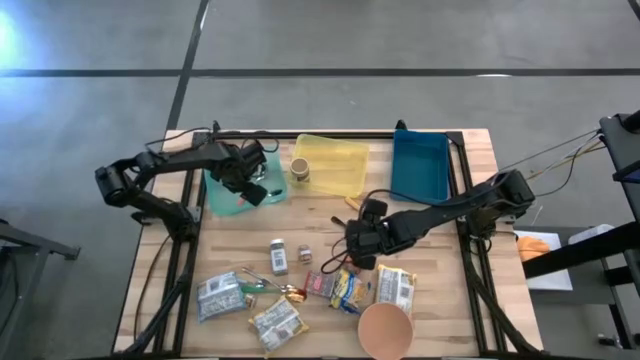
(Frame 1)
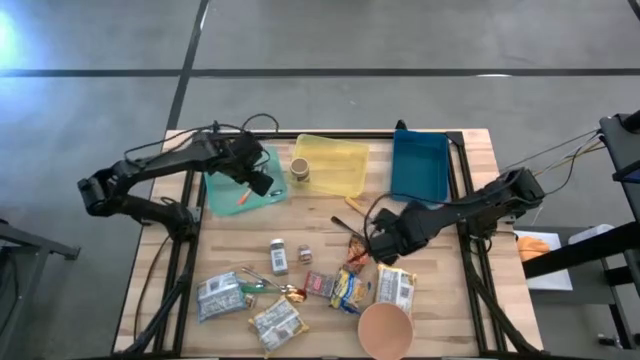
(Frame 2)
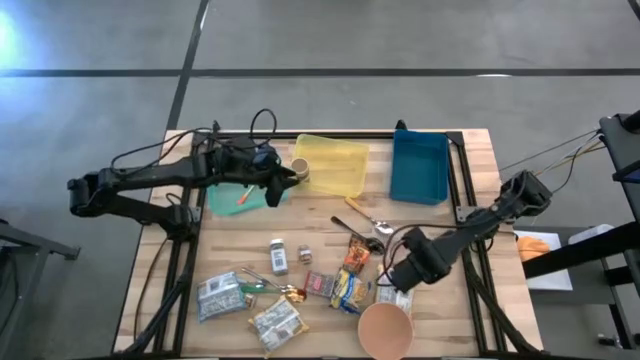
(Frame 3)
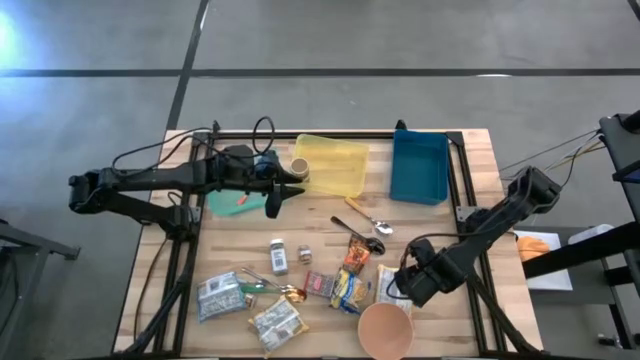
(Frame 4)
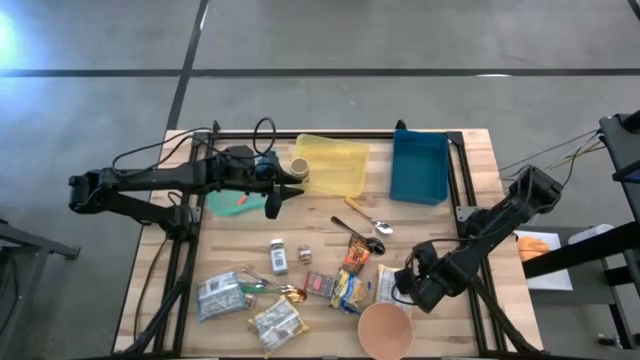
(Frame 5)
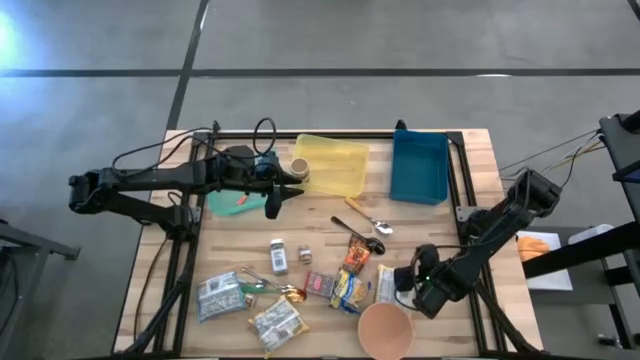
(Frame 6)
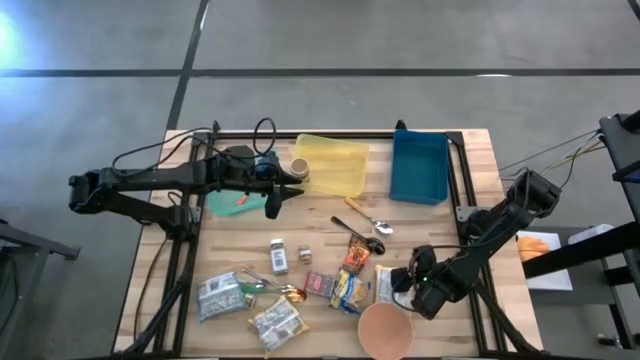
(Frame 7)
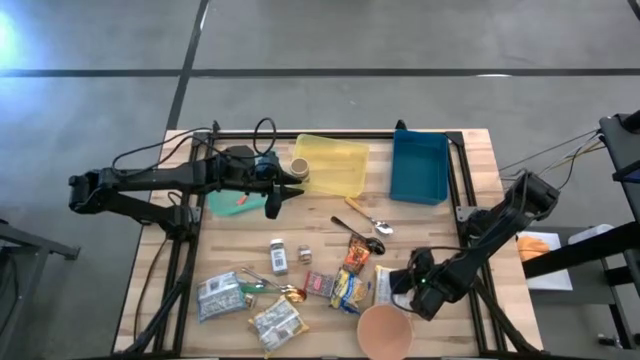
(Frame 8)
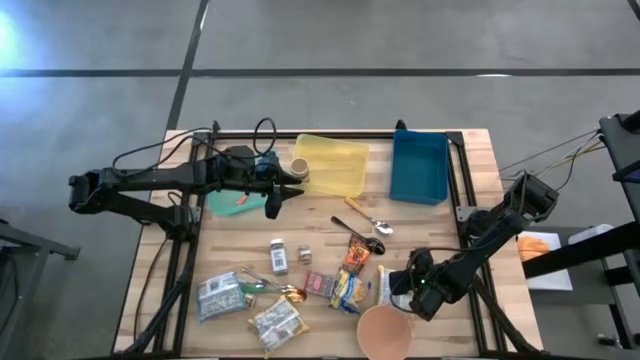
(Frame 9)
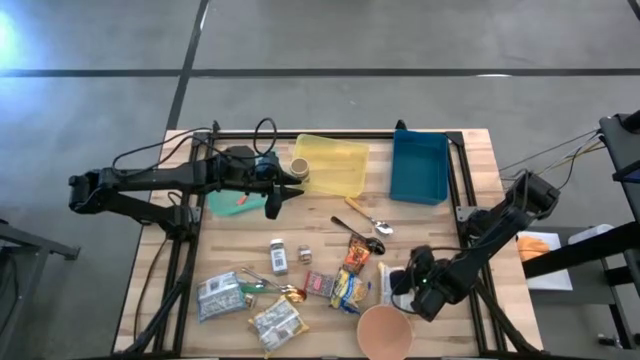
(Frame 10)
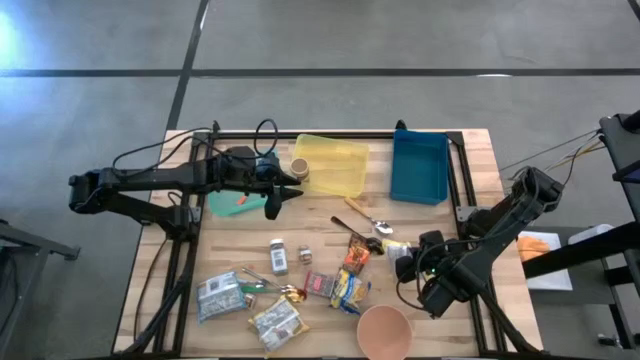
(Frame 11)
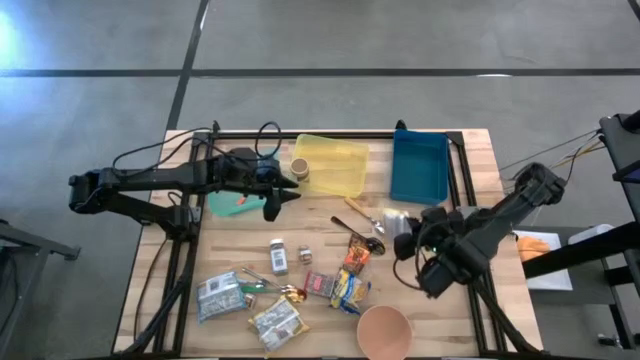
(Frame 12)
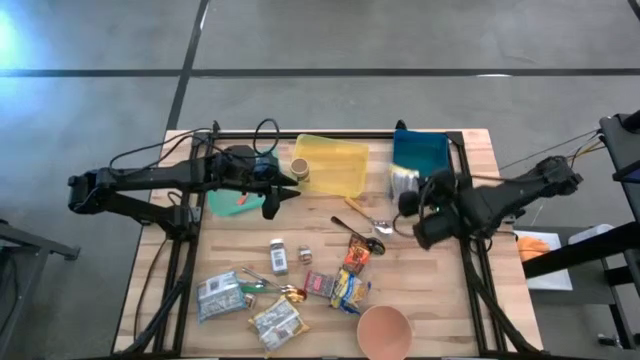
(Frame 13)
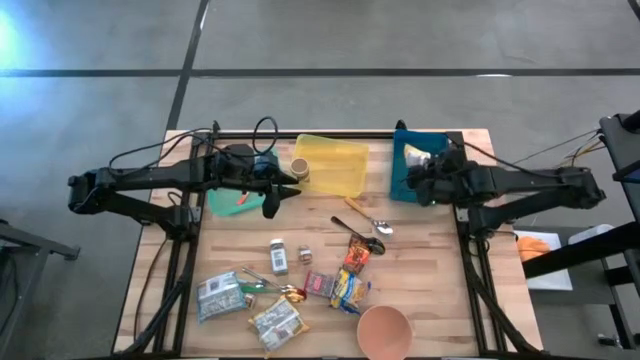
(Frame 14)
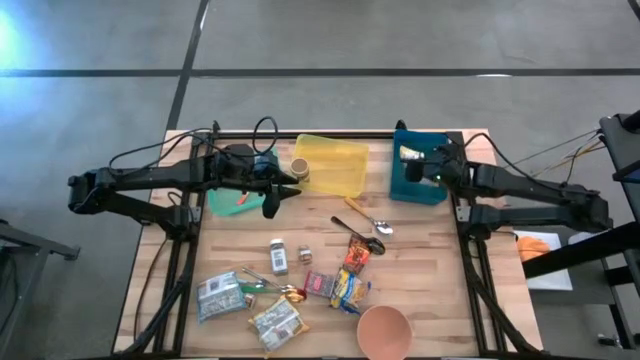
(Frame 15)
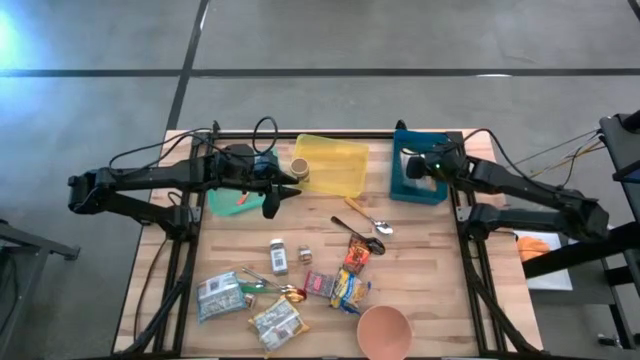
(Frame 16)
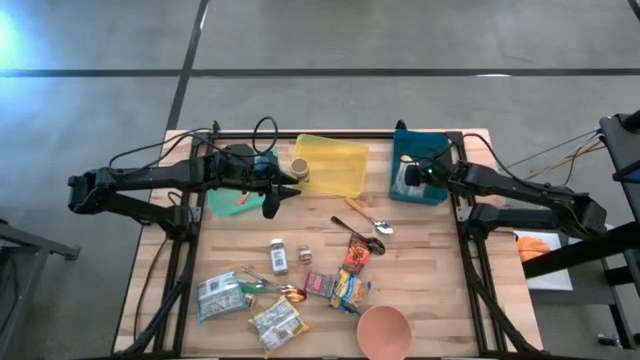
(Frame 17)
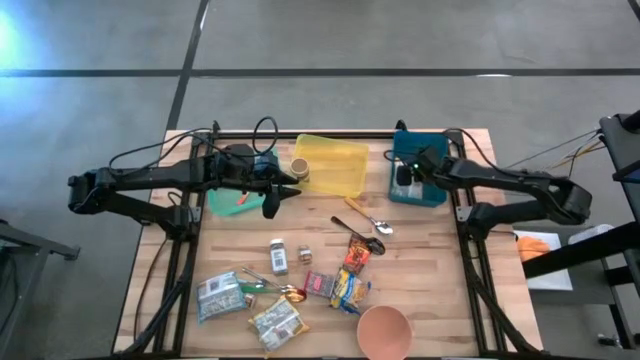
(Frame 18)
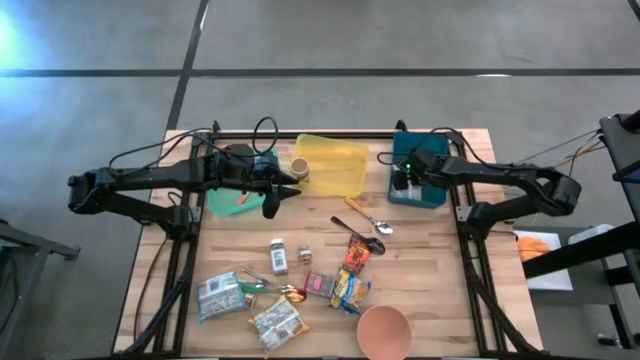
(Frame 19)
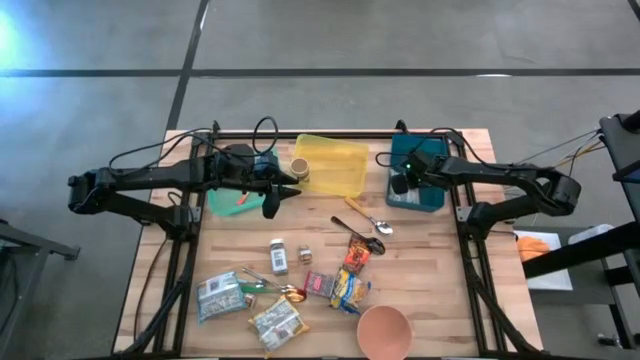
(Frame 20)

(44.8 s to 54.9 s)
Put the right yellow noodle pack into the blue bin

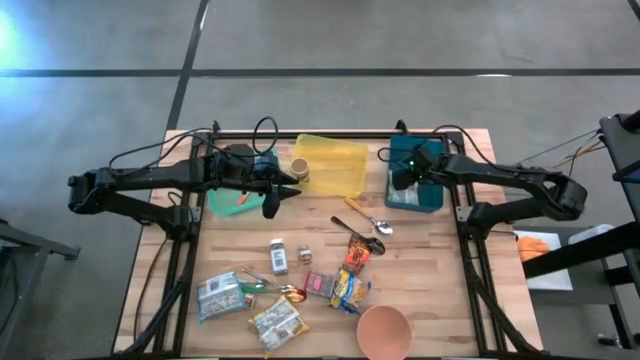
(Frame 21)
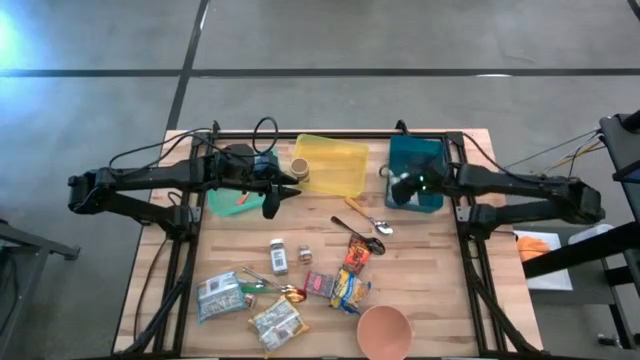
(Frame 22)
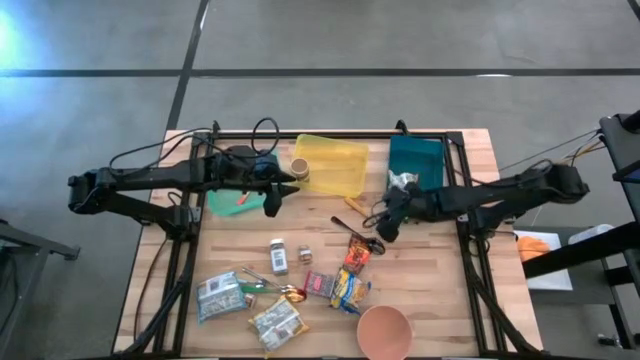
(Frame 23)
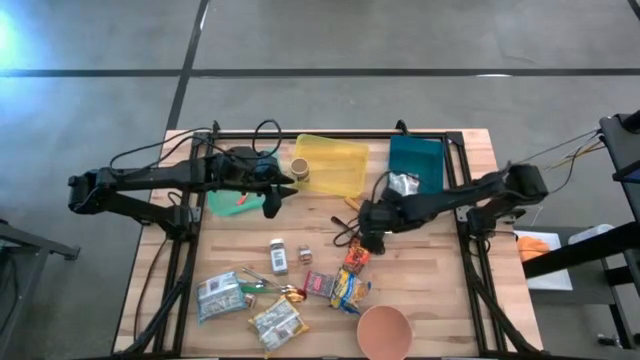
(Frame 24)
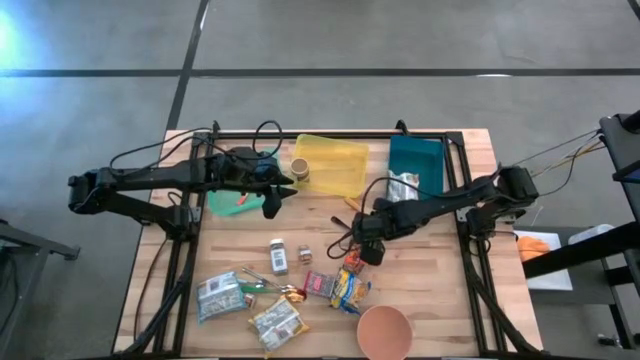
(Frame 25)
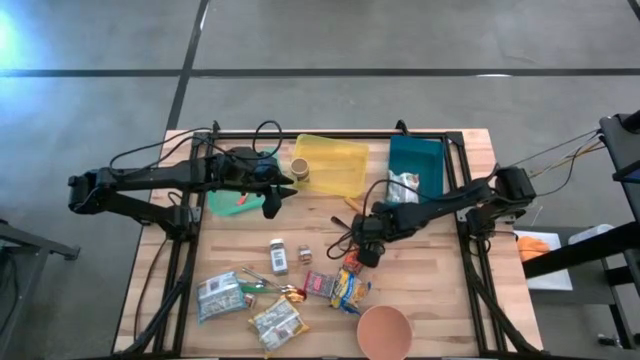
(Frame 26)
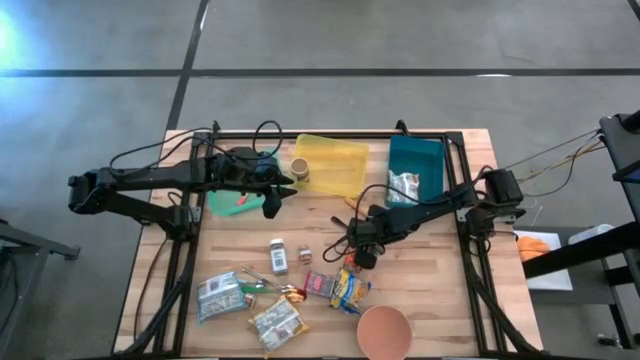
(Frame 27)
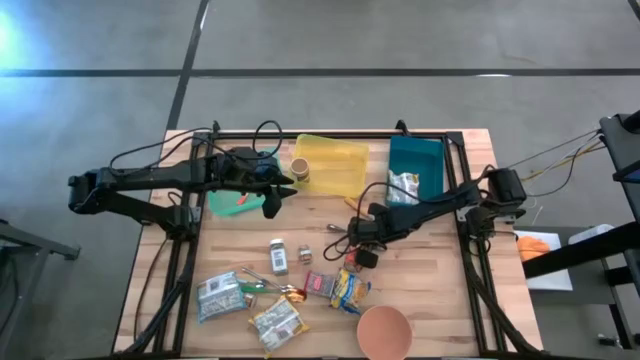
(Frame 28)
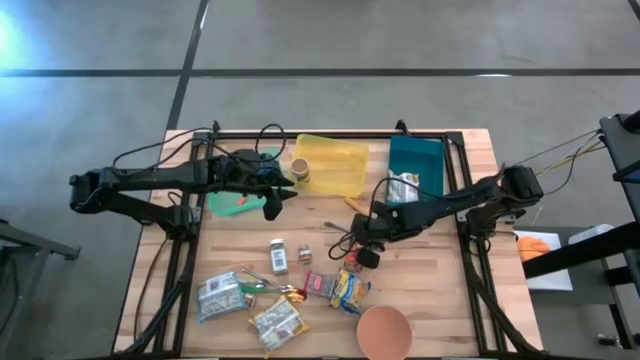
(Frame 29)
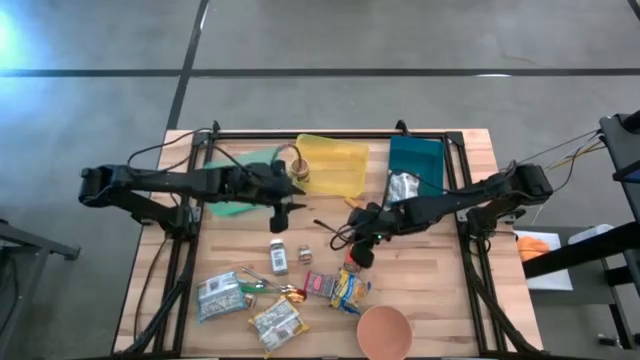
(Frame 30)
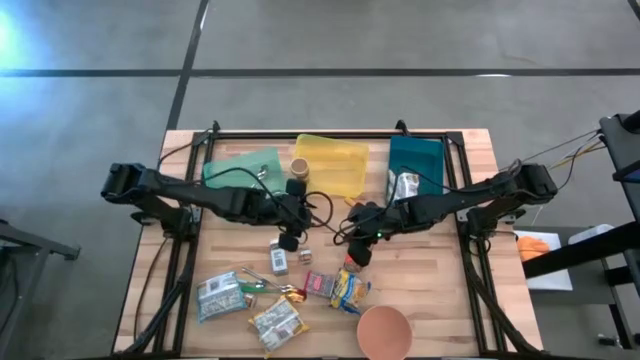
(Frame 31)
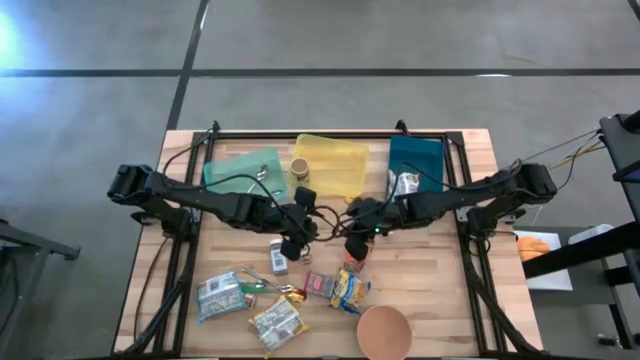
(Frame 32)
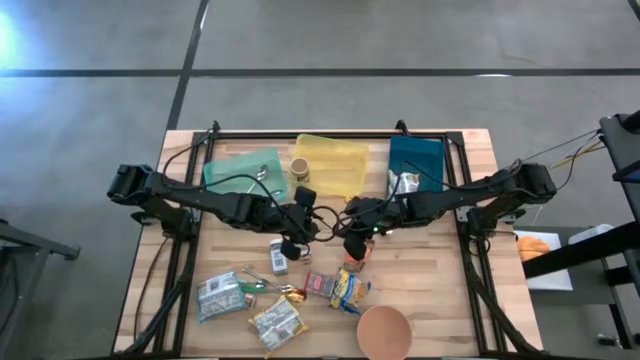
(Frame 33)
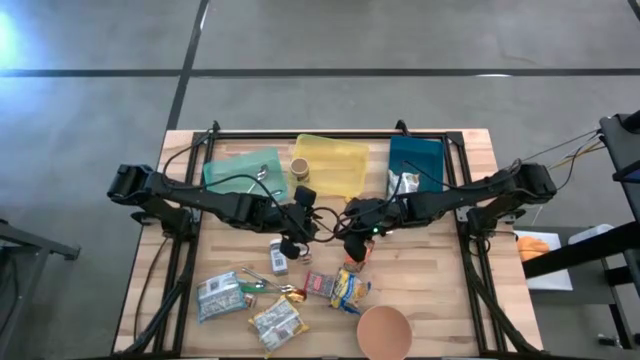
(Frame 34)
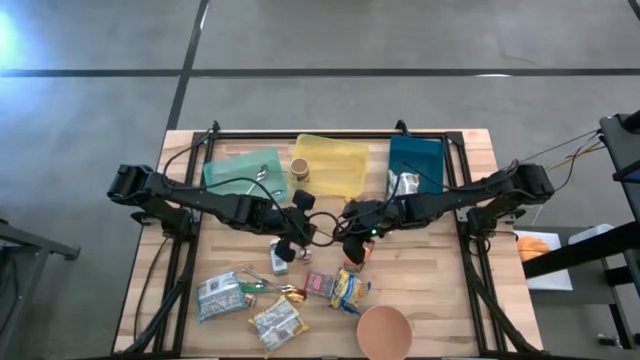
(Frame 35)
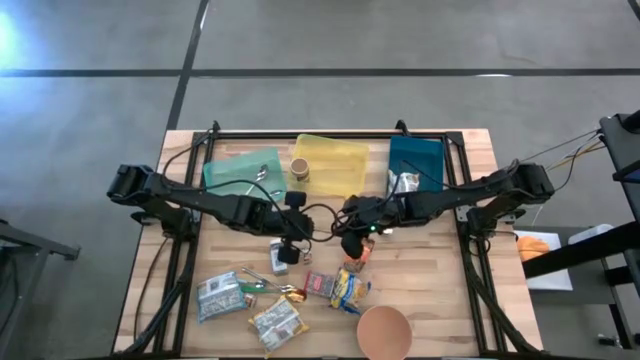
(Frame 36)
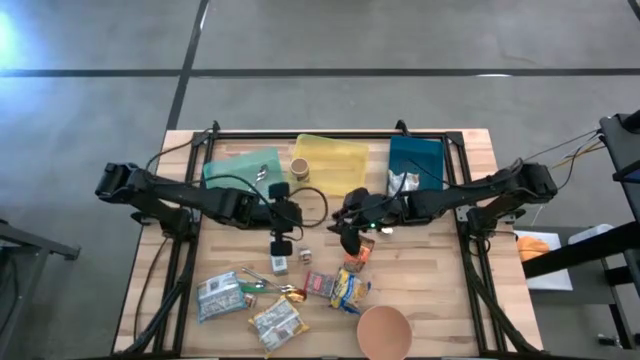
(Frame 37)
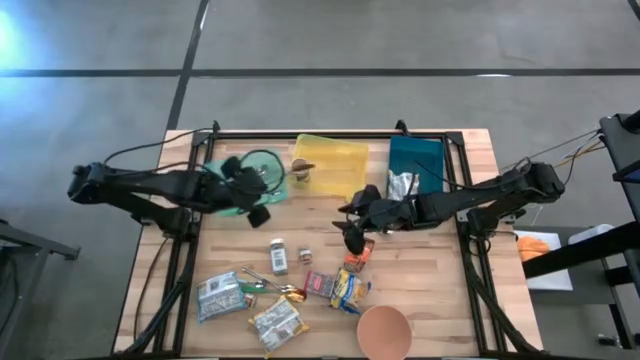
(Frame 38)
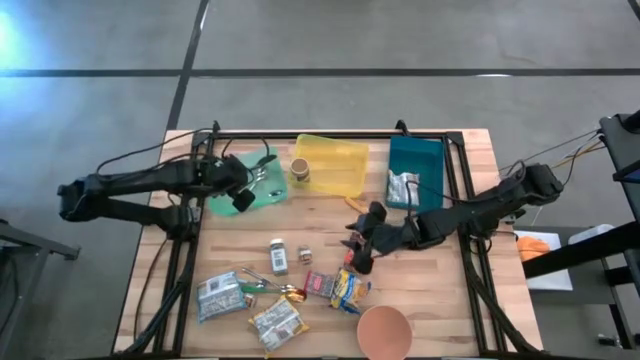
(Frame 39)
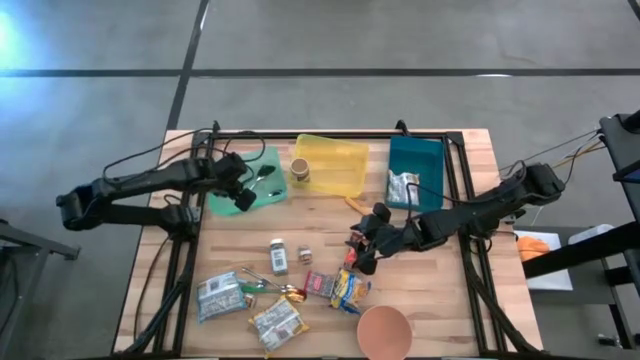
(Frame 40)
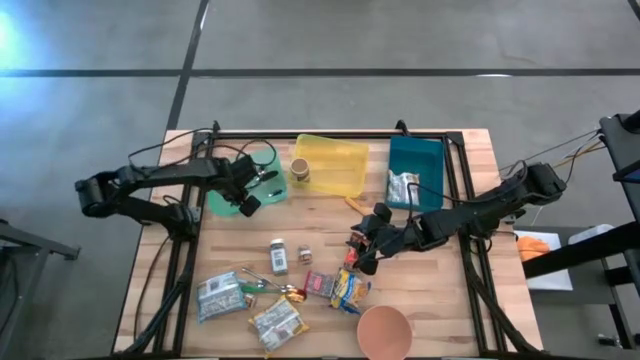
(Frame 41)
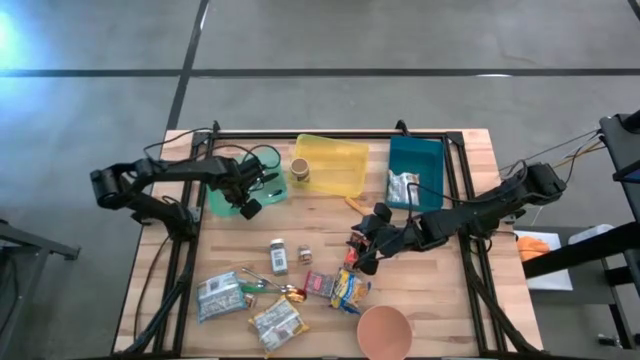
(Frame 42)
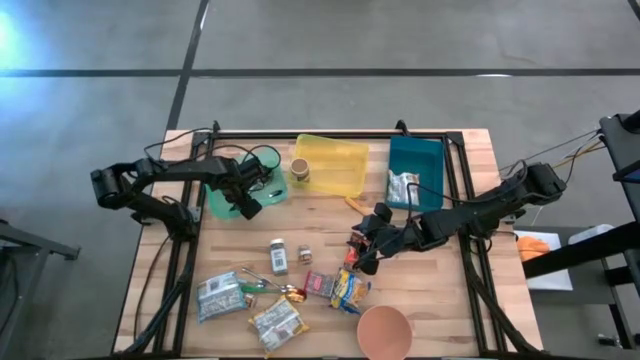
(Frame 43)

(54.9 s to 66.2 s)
Put the black spoon into the green bin
